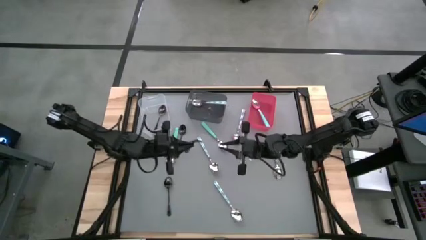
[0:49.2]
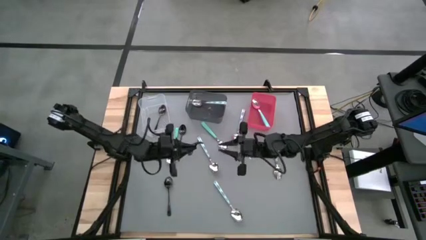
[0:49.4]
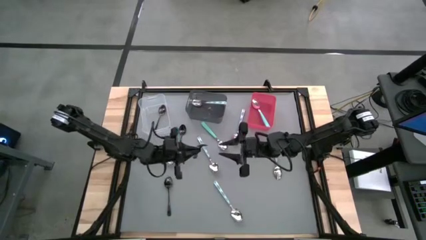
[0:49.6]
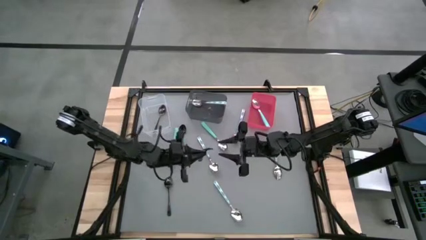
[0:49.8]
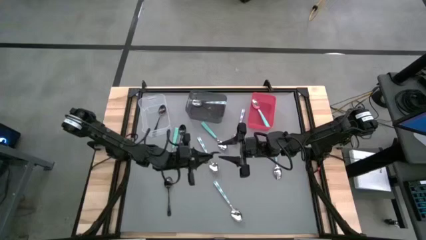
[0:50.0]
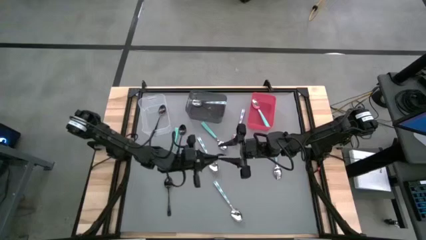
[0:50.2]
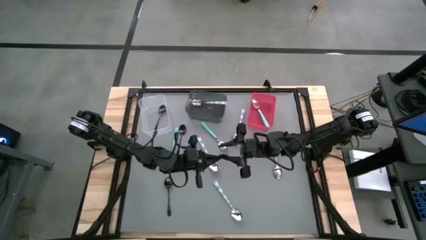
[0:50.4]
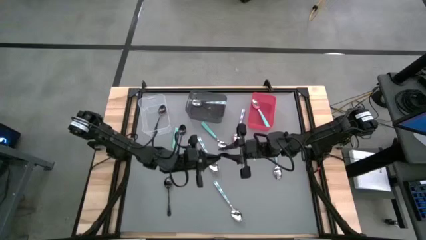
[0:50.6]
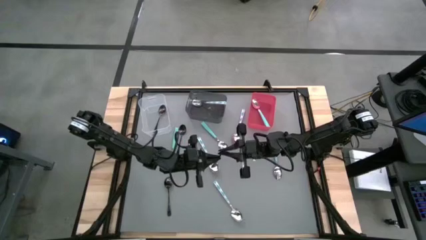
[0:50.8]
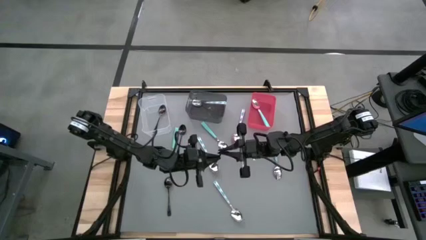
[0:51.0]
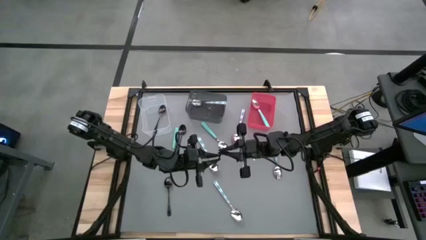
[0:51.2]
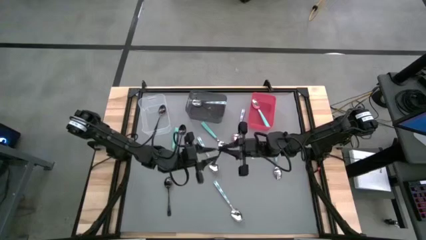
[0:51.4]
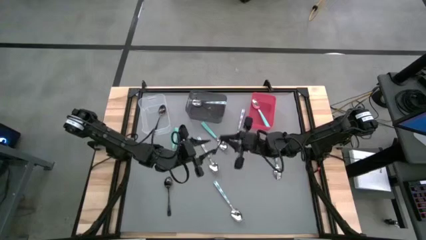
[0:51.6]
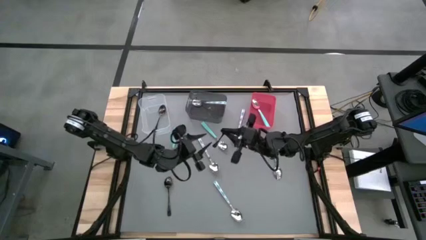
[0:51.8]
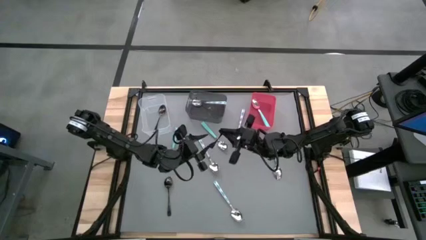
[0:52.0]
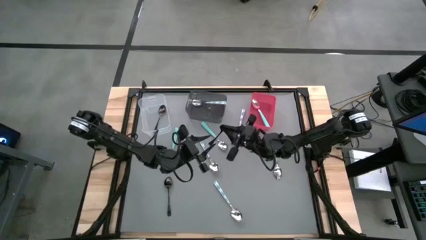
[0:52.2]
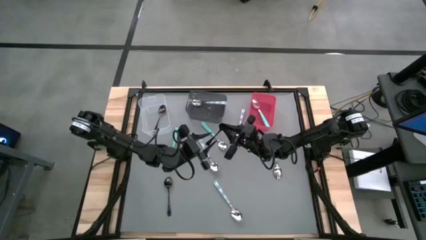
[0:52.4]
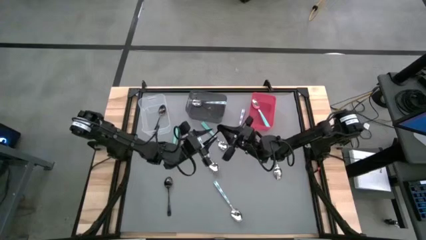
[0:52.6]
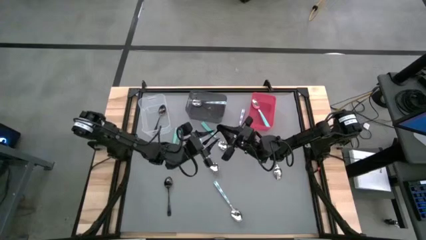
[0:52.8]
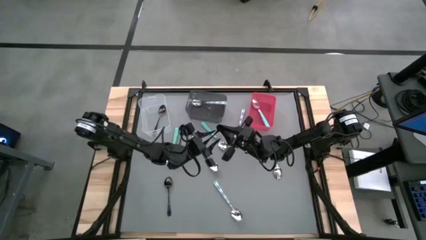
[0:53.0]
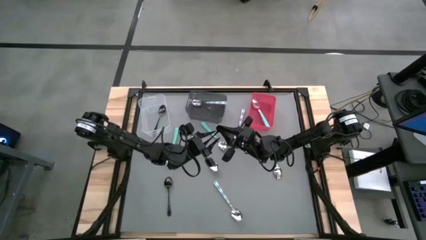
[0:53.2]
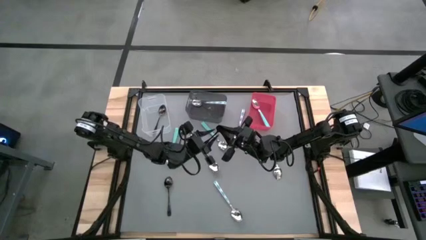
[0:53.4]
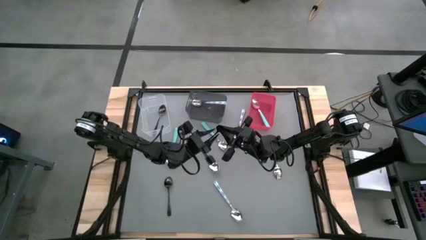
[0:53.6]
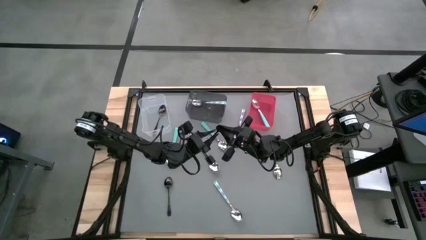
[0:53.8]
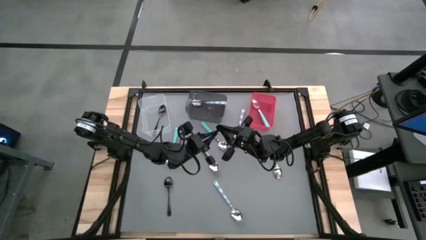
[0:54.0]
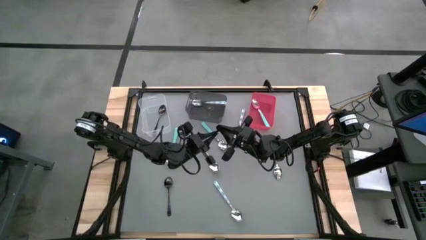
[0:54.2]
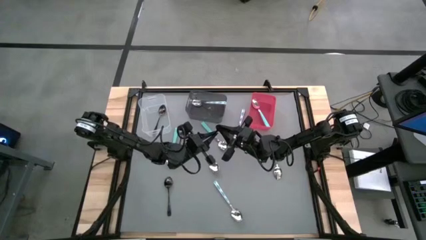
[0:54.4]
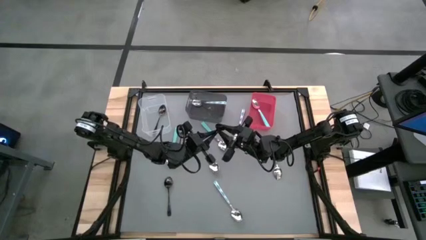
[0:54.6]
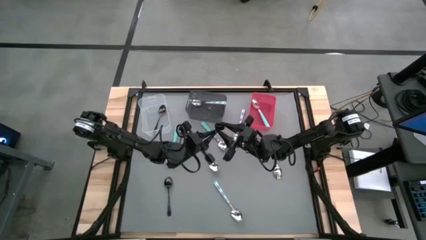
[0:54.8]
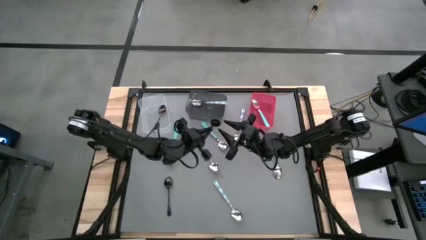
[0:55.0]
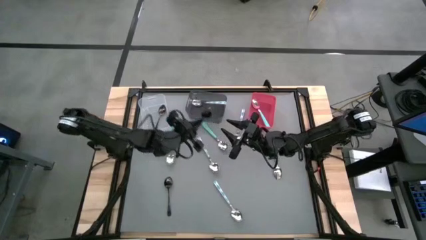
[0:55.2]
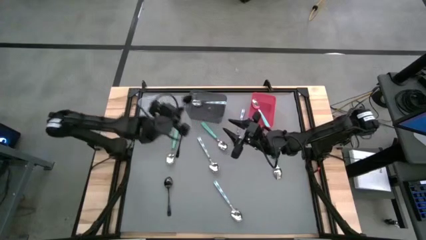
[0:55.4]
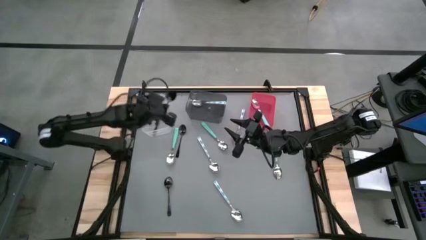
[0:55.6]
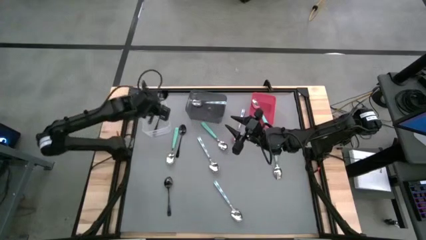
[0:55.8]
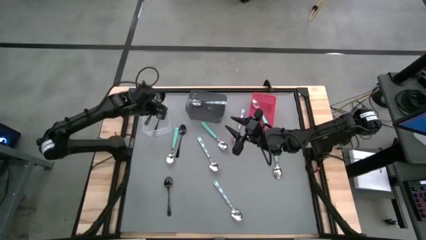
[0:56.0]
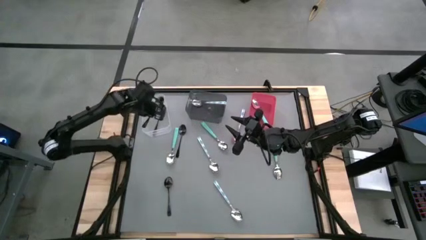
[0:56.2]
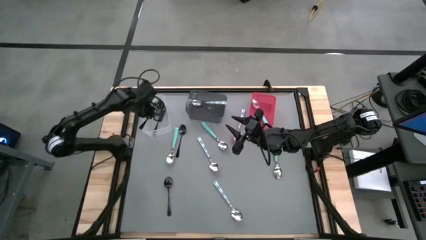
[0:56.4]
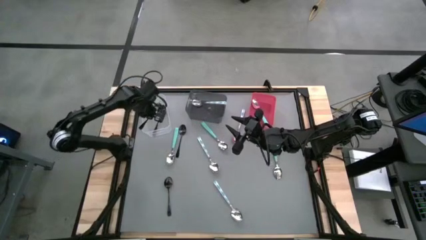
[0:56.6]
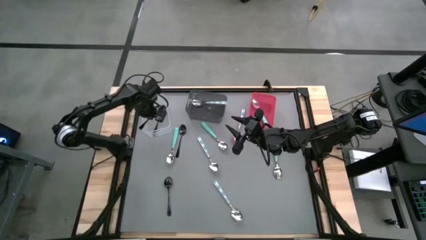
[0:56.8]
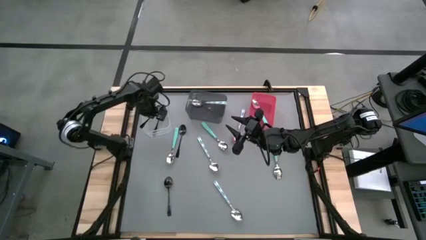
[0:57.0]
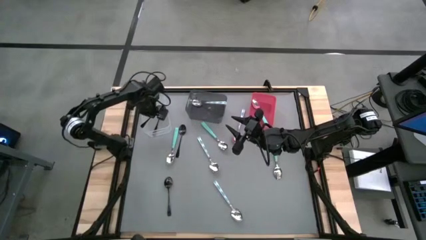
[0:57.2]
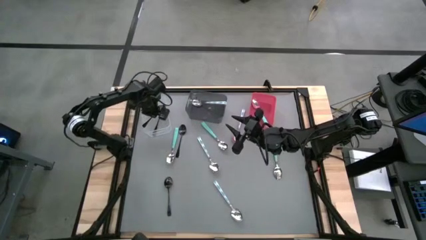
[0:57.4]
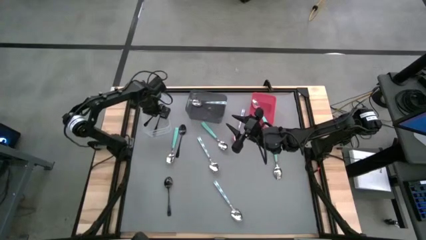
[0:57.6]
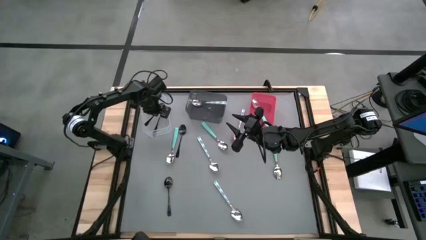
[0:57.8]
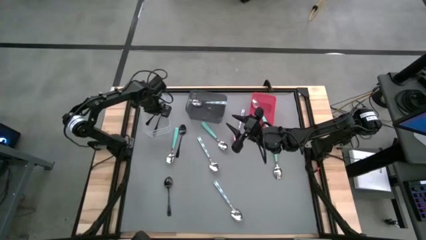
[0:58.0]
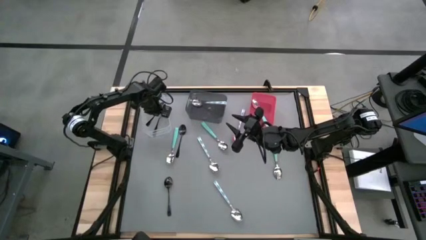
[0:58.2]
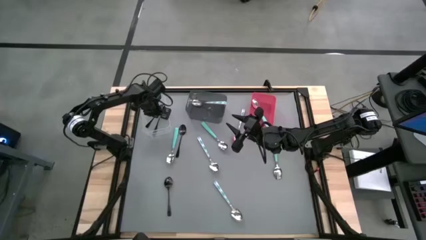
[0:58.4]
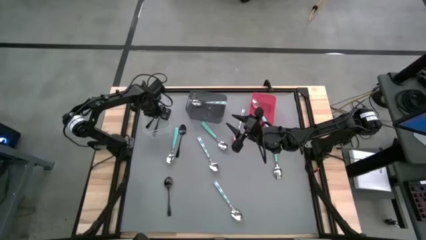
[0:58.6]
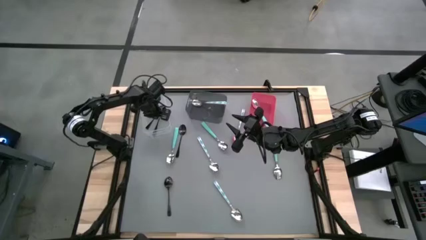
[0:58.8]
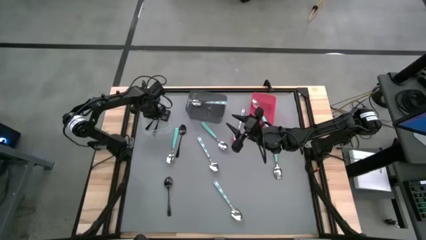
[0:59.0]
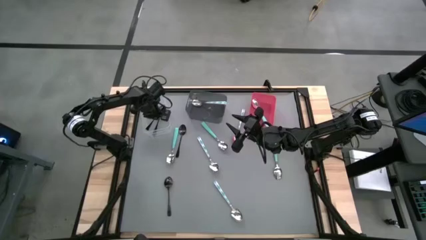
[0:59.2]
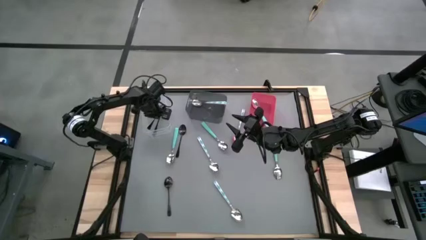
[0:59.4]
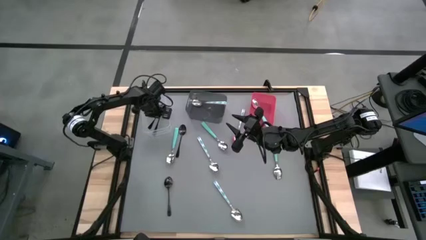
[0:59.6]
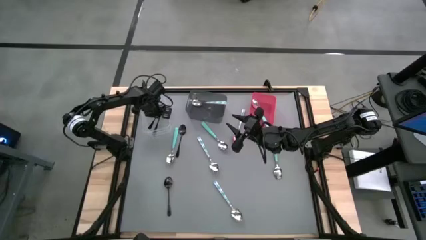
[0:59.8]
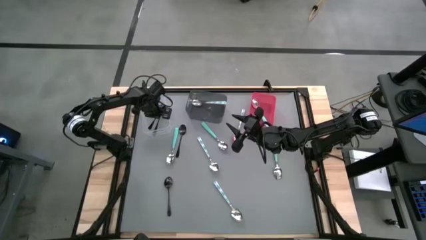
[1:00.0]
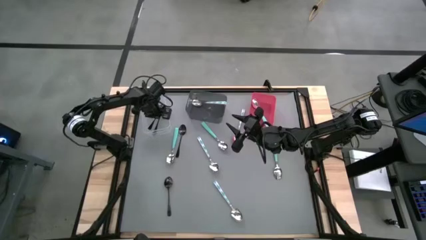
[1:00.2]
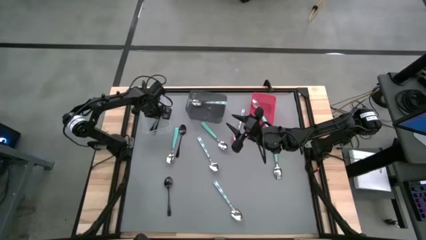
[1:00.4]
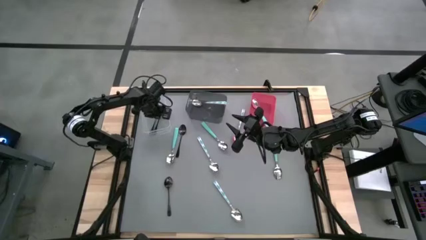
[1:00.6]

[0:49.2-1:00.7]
Task: Sort silverware by color (type)
Put the middle black spoon into the transparent bin

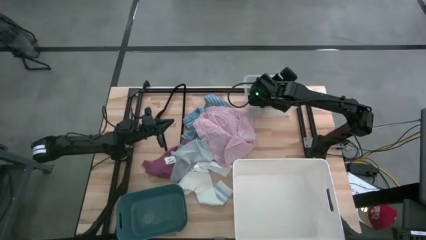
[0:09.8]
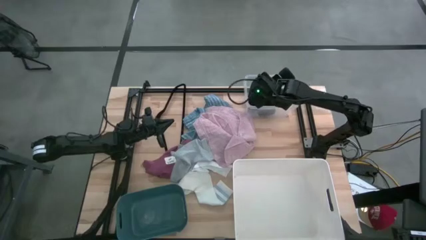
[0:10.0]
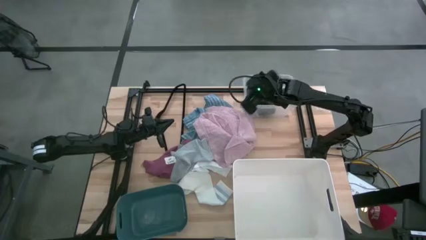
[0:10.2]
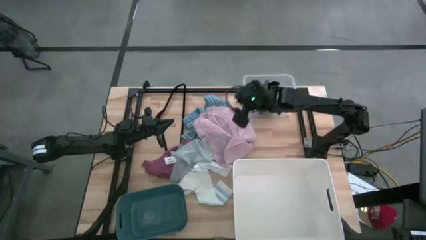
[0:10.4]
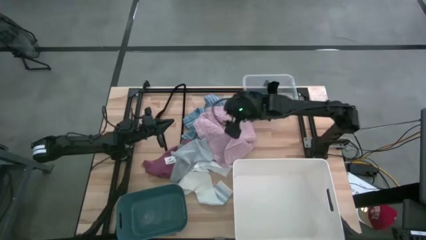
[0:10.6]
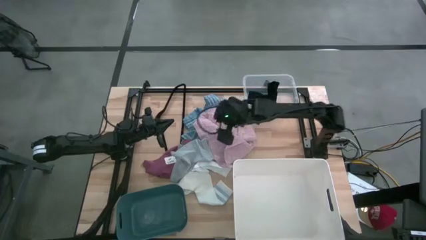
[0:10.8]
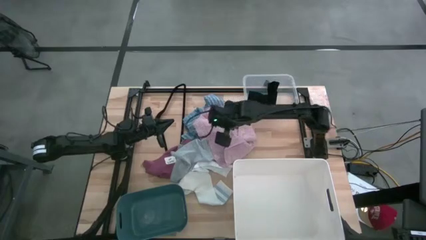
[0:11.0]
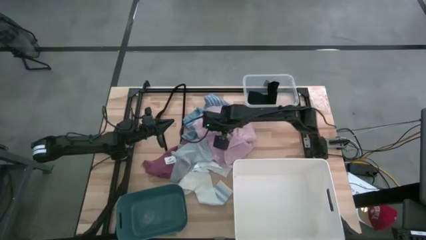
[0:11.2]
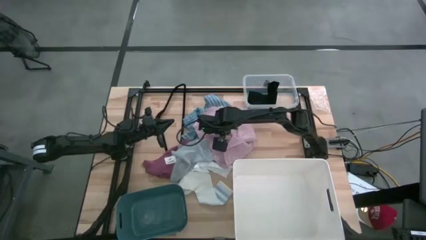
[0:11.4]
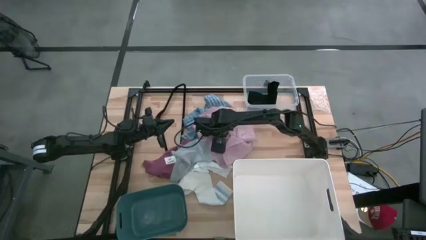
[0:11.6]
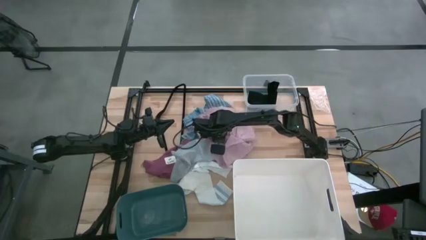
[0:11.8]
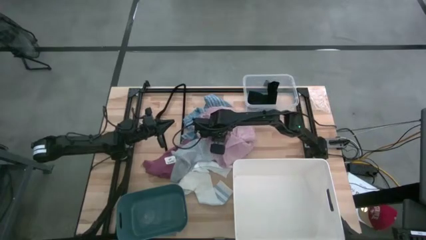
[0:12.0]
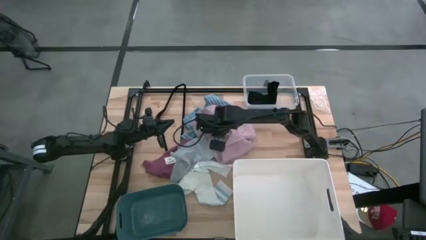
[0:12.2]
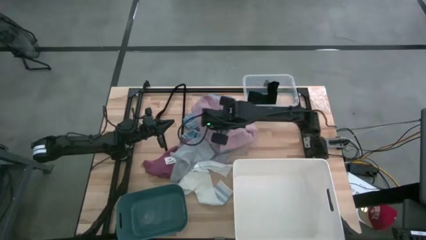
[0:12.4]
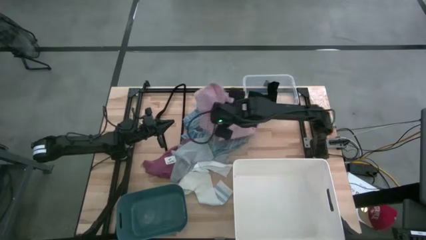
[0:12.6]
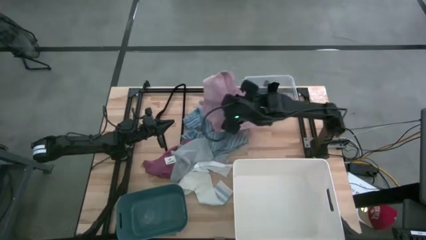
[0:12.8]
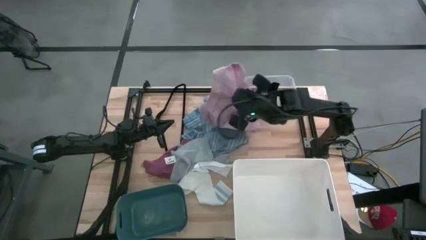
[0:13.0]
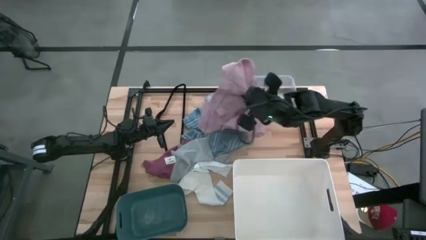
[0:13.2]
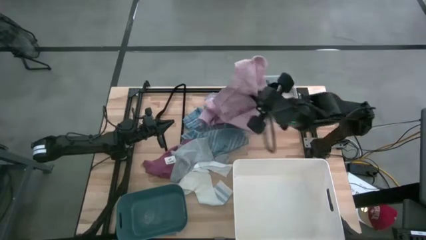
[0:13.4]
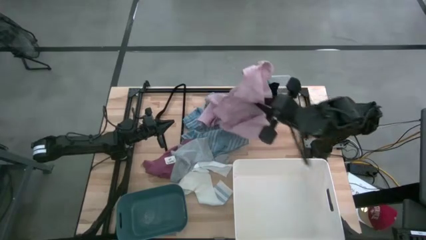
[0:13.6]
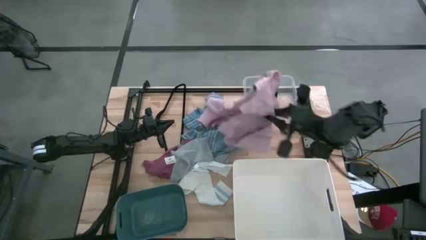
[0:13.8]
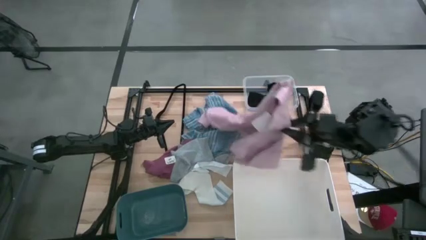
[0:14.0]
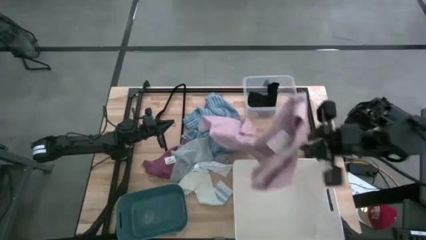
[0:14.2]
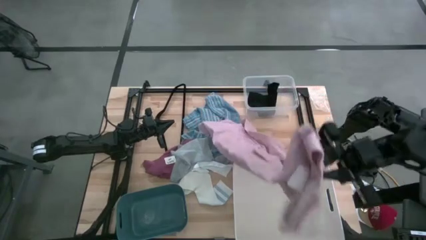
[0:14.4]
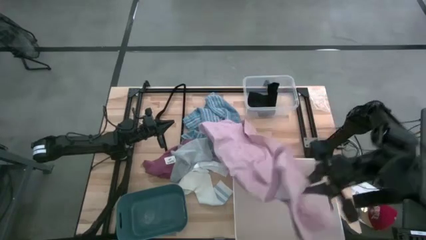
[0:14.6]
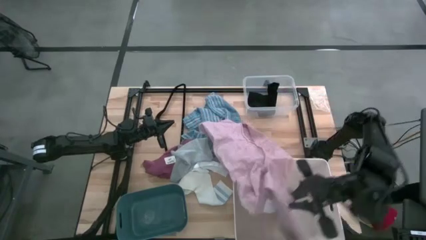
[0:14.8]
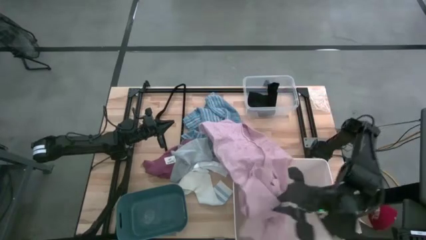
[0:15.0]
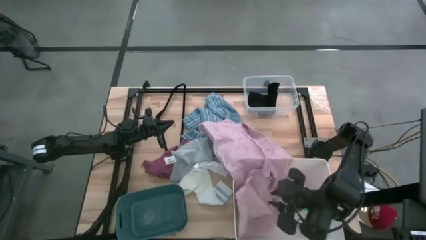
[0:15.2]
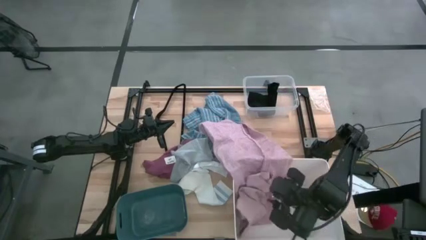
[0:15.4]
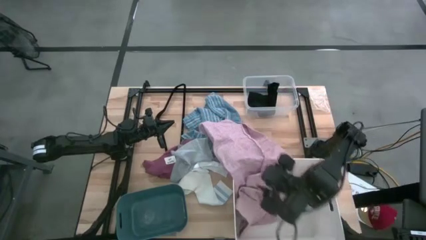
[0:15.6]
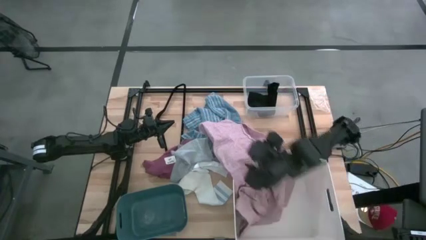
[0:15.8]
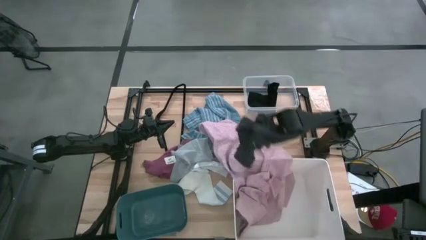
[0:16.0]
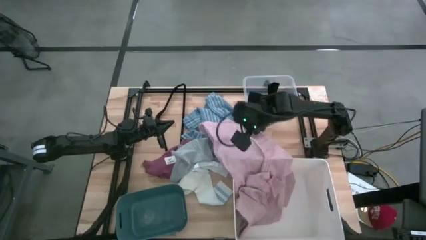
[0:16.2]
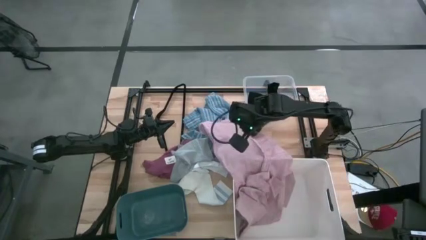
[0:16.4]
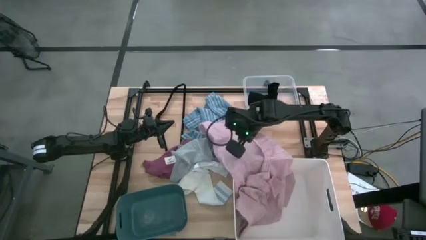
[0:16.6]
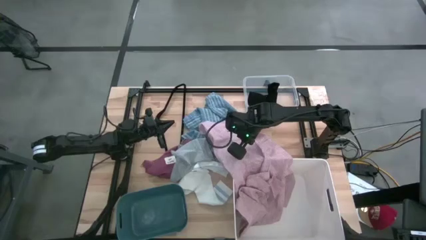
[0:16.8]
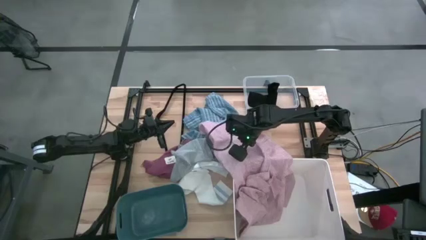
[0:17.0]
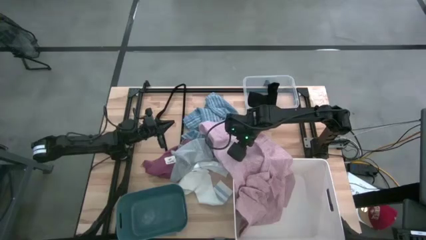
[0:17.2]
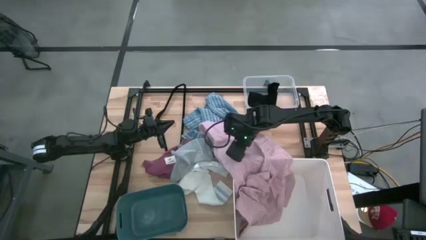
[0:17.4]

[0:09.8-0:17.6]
Task: Pick & Place Cloths
Put the light pink shirt into the white bin
